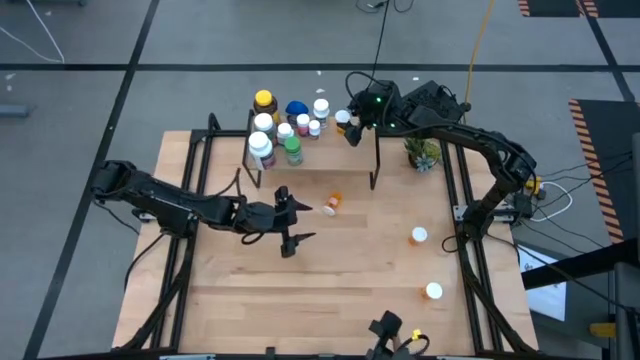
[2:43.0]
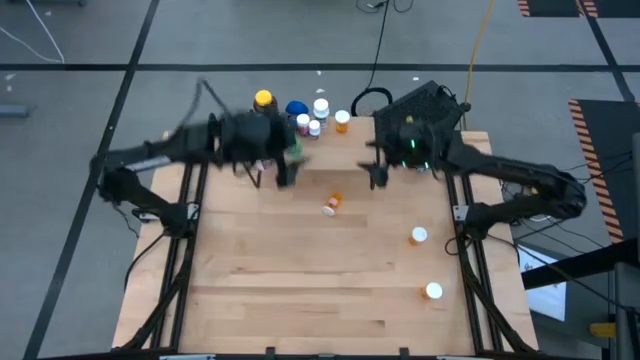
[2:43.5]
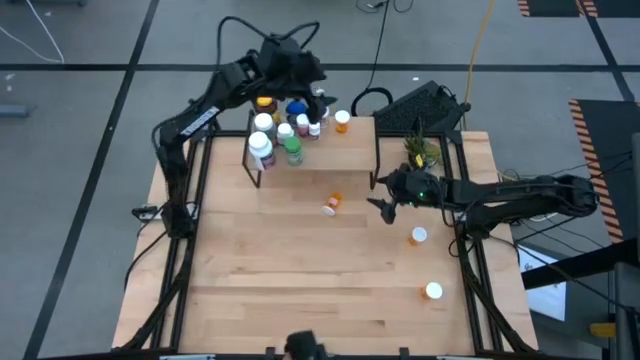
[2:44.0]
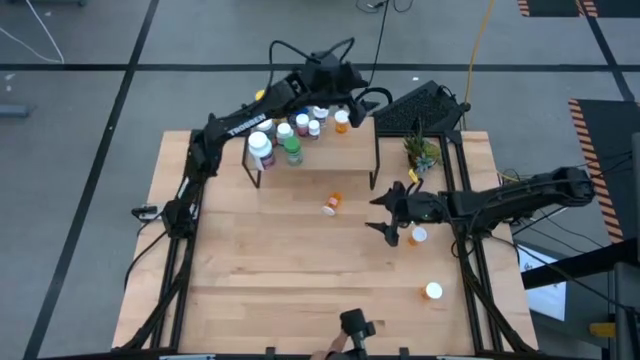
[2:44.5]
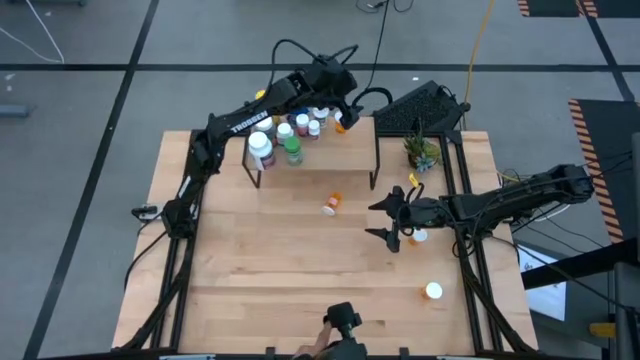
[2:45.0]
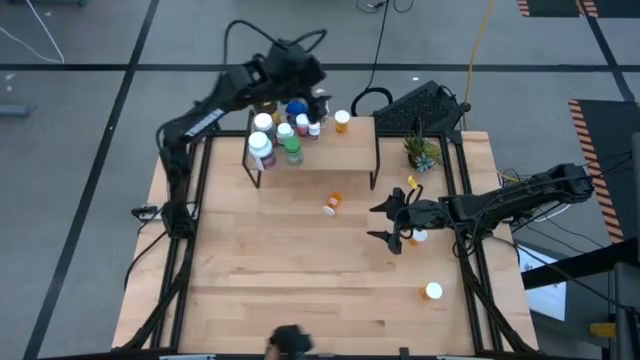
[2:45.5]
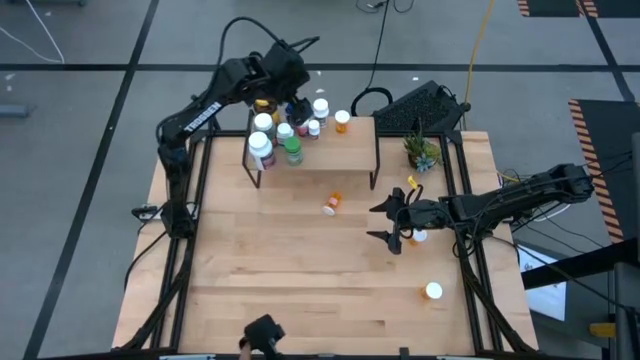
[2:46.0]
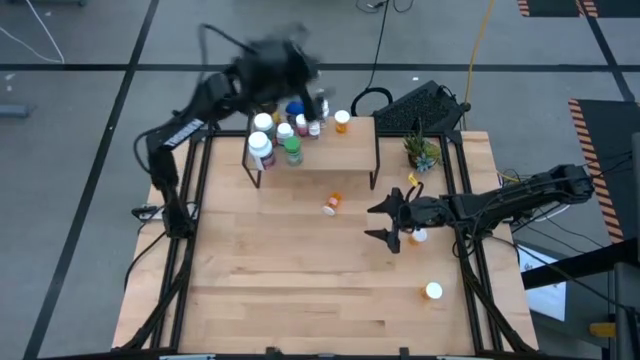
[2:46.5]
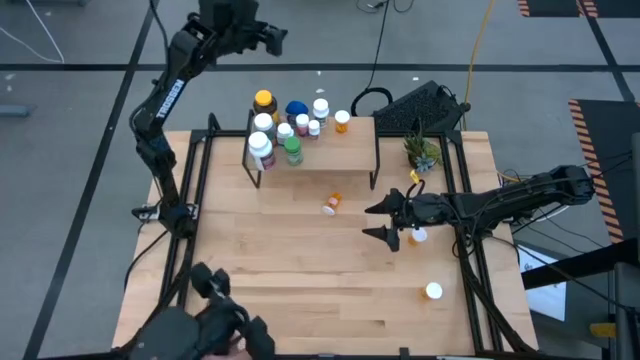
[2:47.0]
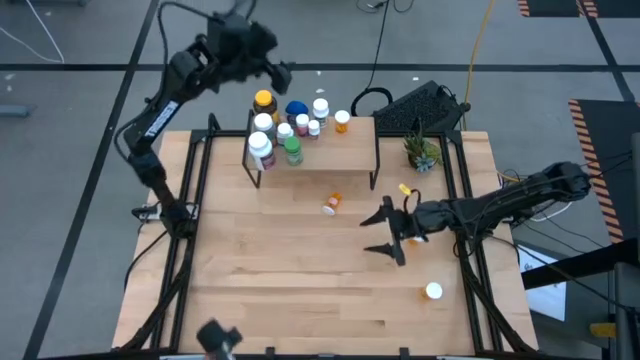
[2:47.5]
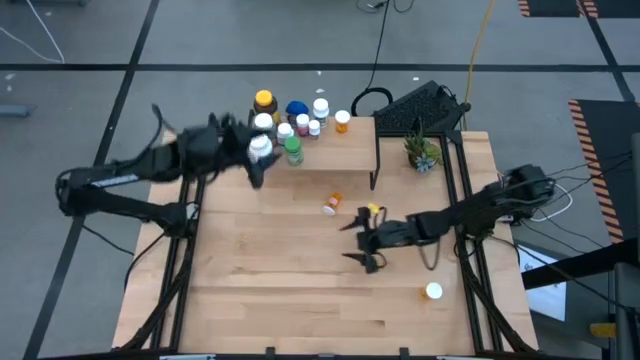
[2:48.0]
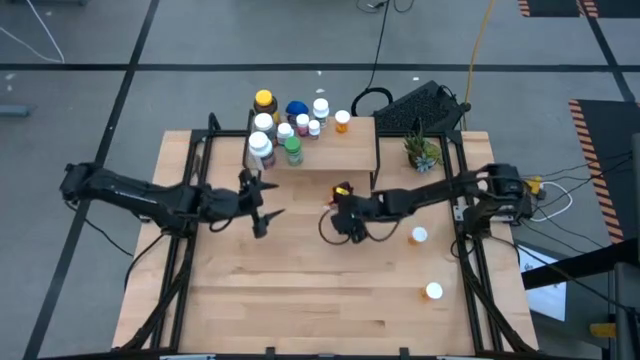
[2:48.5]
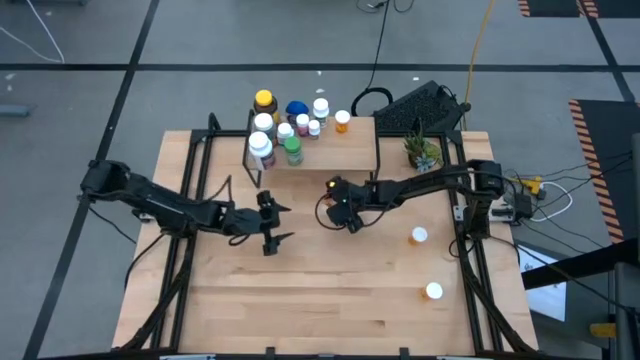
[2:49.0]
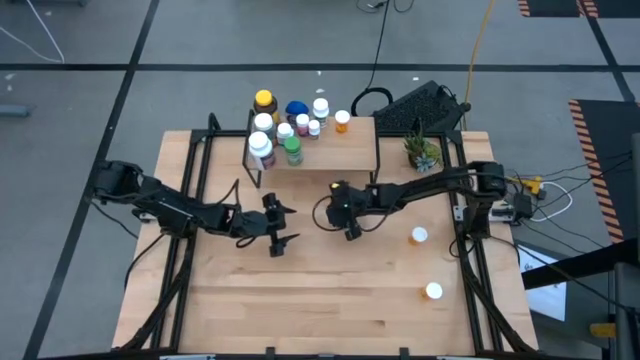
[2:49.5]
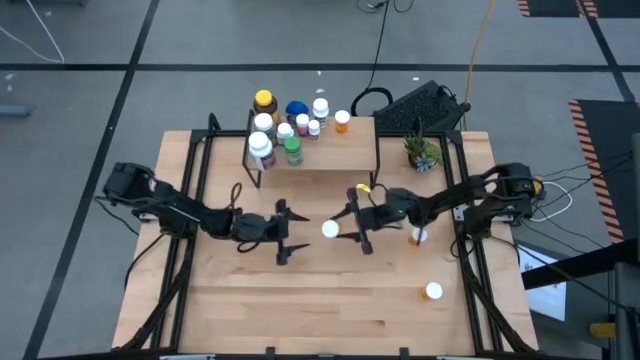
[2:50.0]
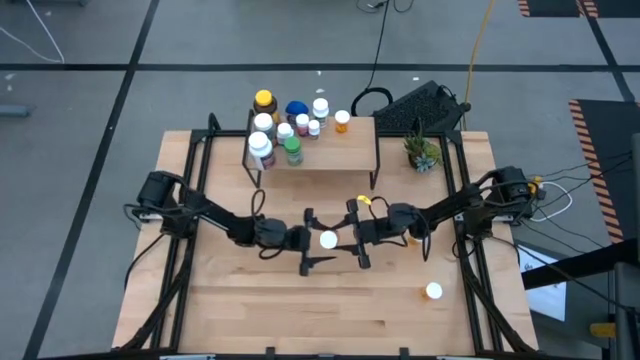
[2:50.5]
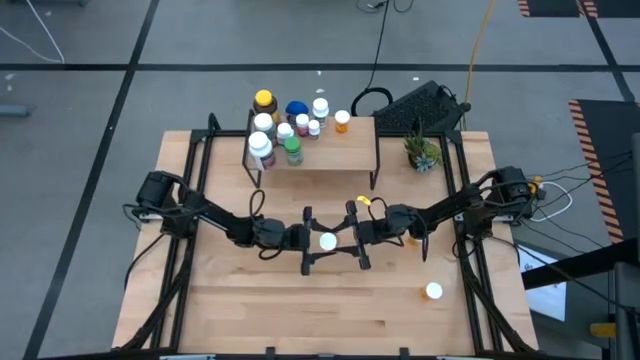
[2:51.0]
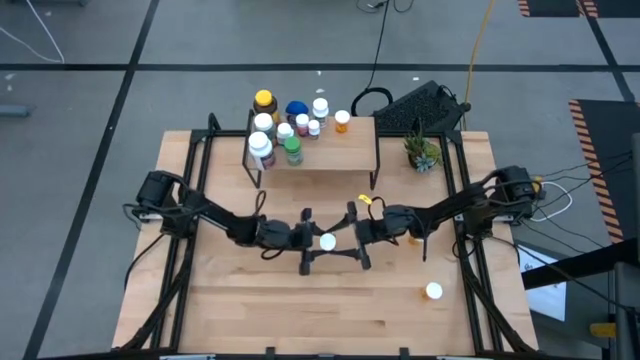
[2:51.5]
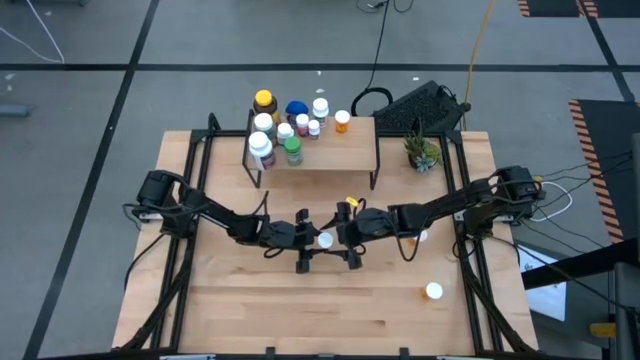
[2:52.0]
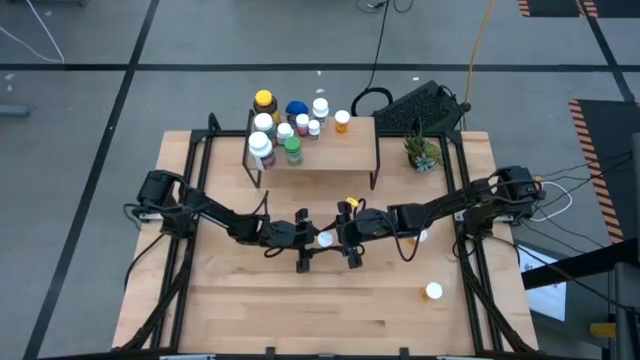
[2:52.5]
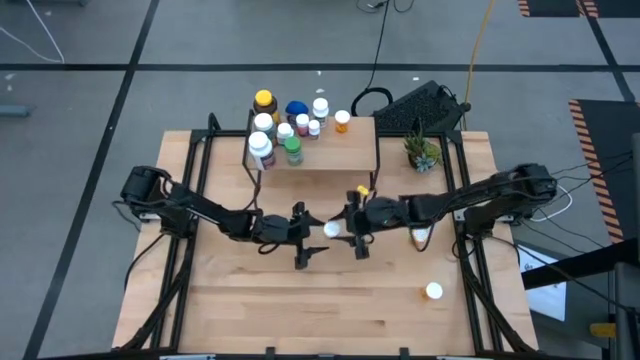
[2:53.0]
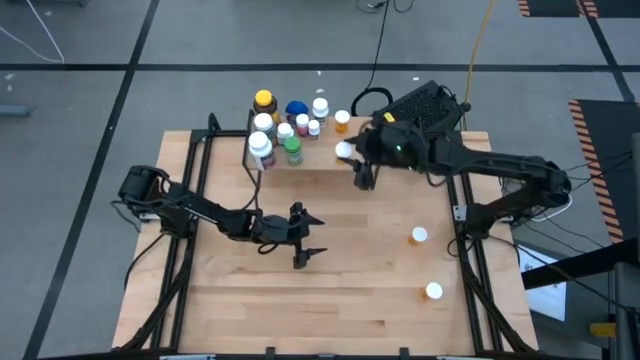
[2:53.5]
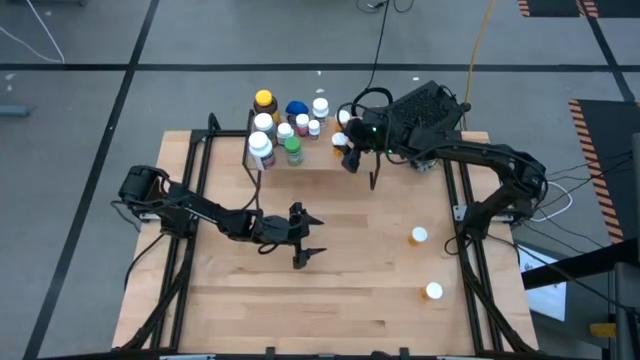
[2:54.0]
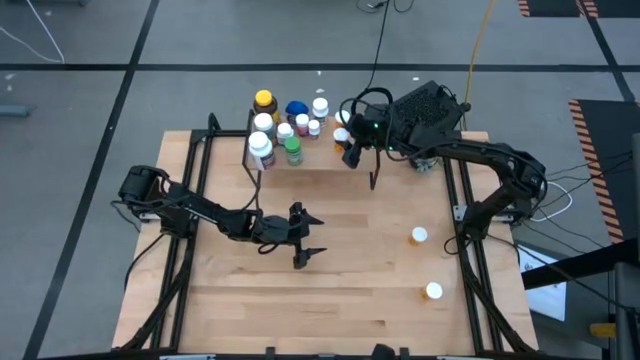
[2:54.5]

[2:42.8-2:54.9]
Task: Pick and place medicine bottles onto shelf by color
Put the top left orange pill bottle on the shelf, aligned with the other orange pill bottle

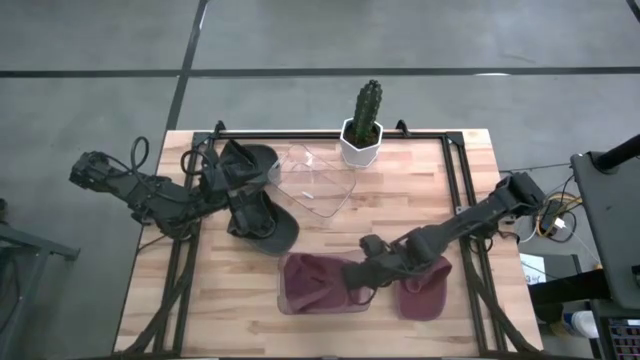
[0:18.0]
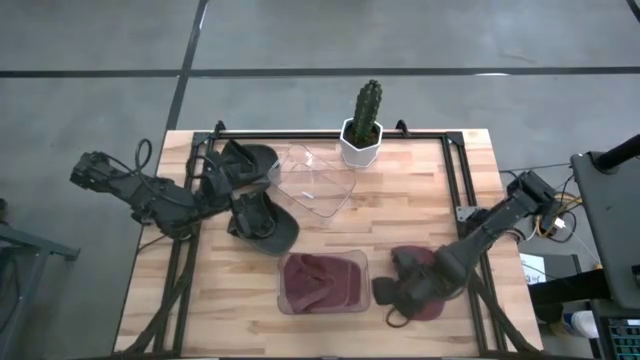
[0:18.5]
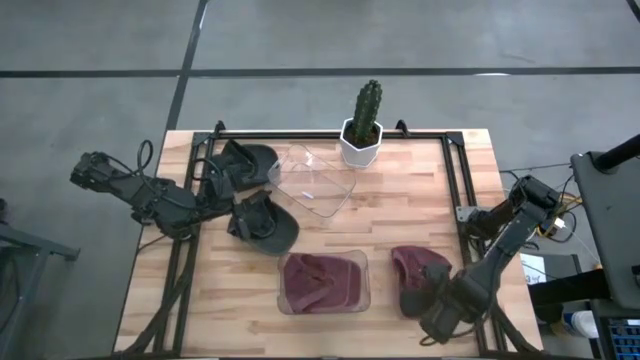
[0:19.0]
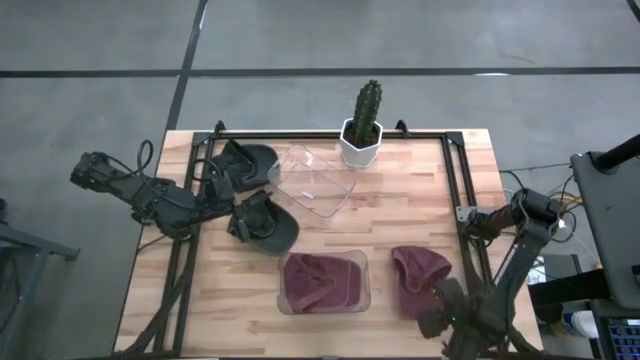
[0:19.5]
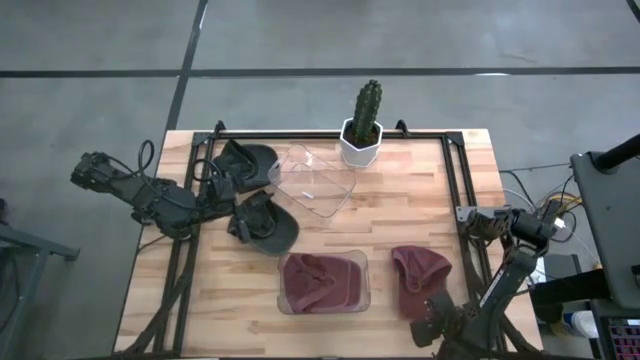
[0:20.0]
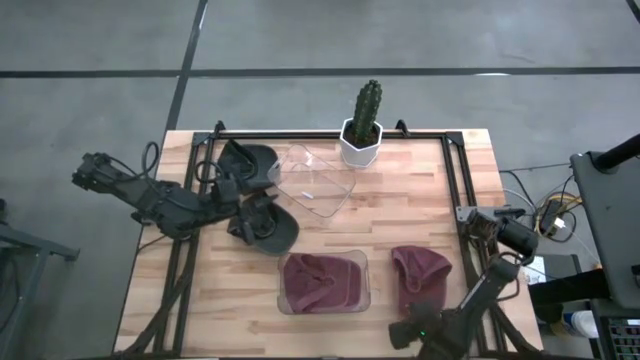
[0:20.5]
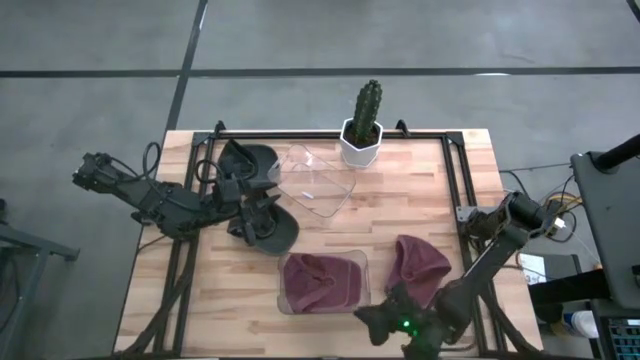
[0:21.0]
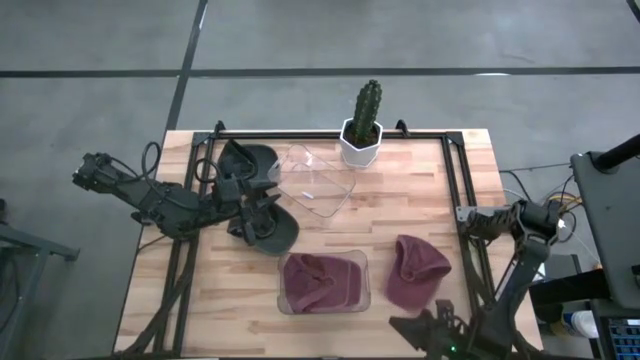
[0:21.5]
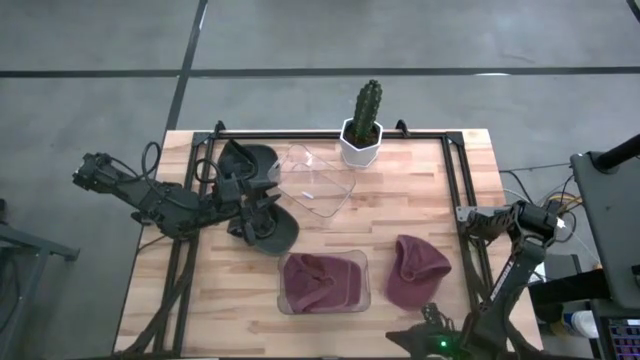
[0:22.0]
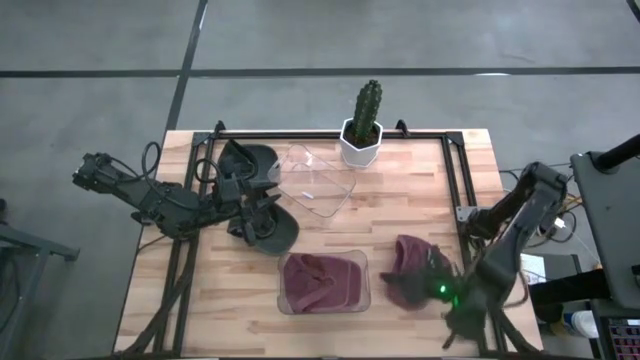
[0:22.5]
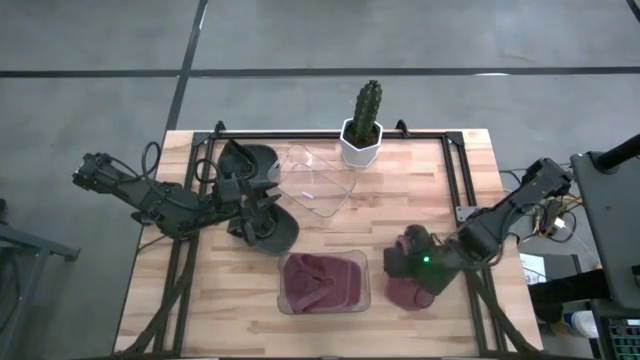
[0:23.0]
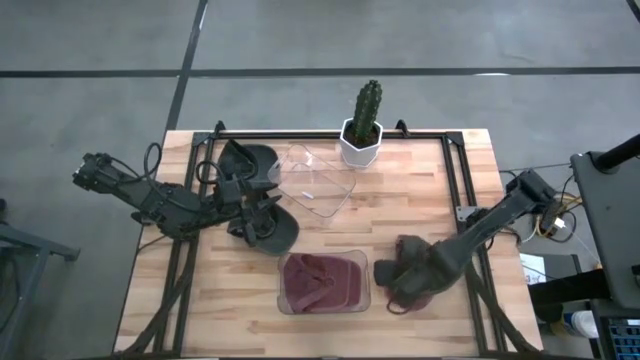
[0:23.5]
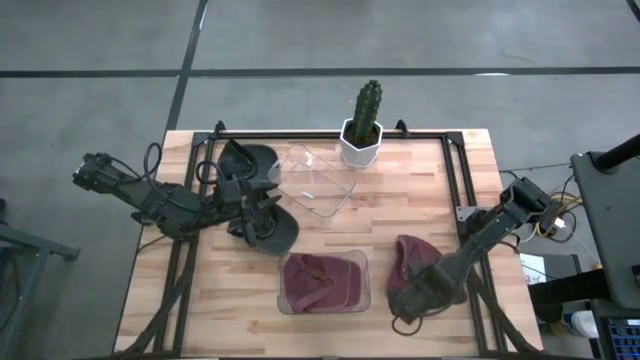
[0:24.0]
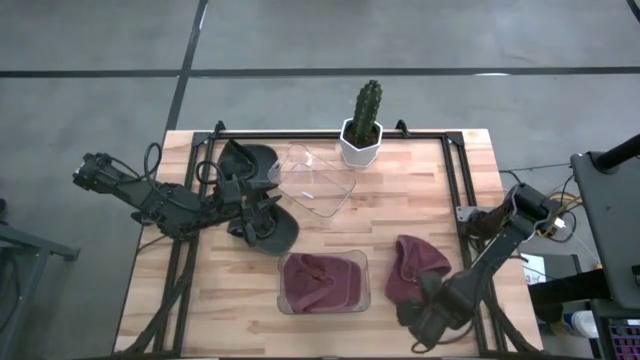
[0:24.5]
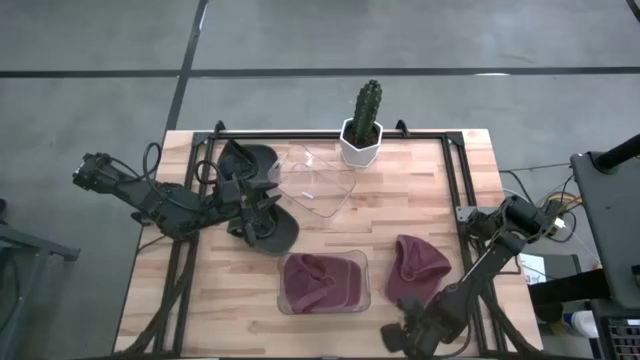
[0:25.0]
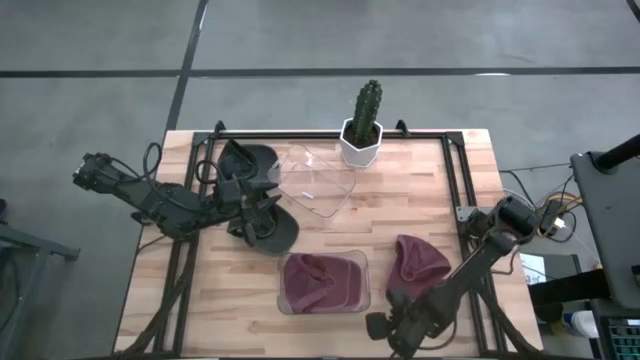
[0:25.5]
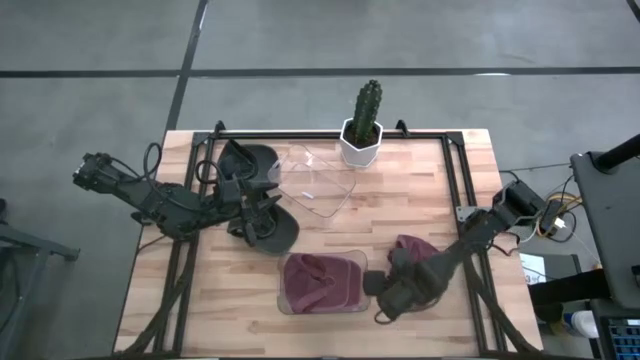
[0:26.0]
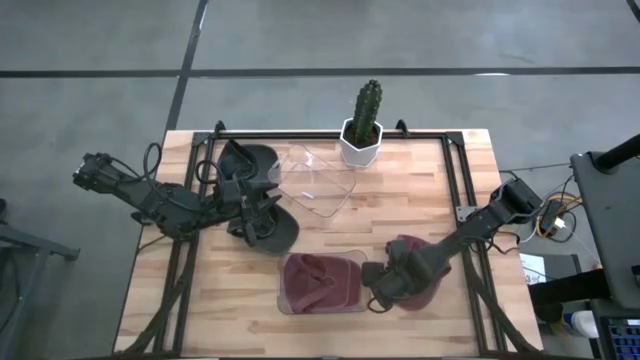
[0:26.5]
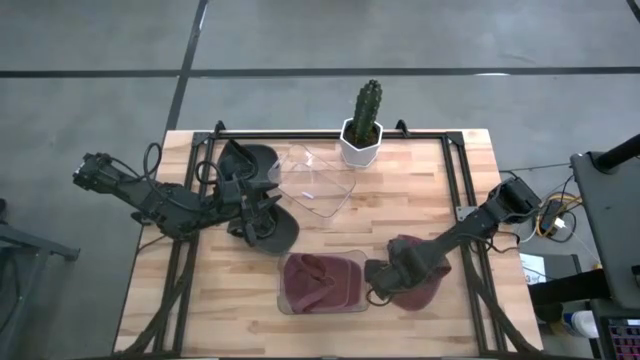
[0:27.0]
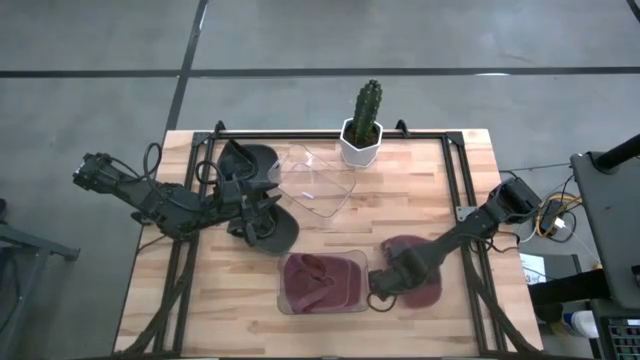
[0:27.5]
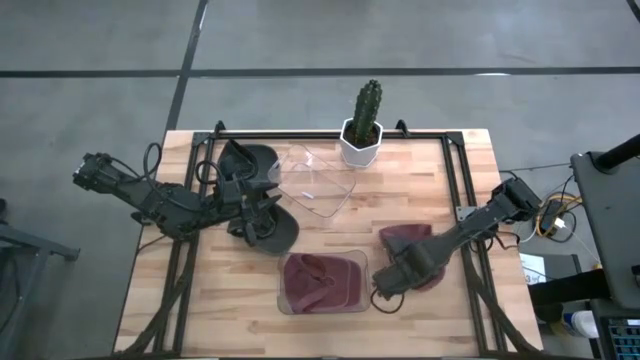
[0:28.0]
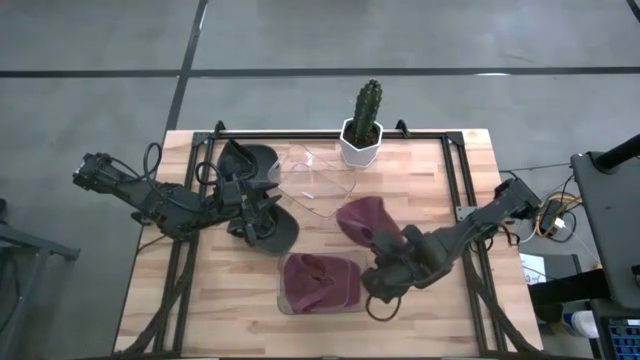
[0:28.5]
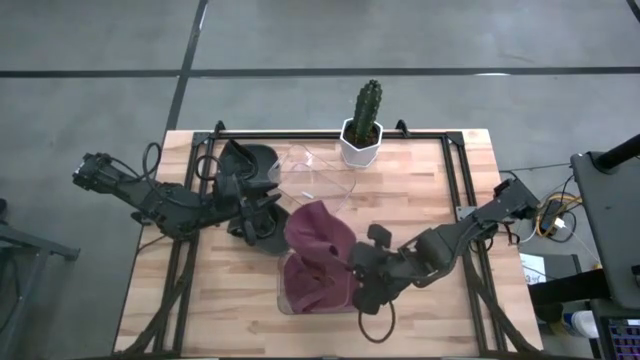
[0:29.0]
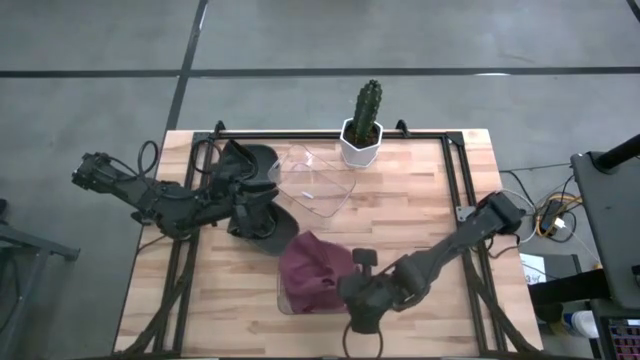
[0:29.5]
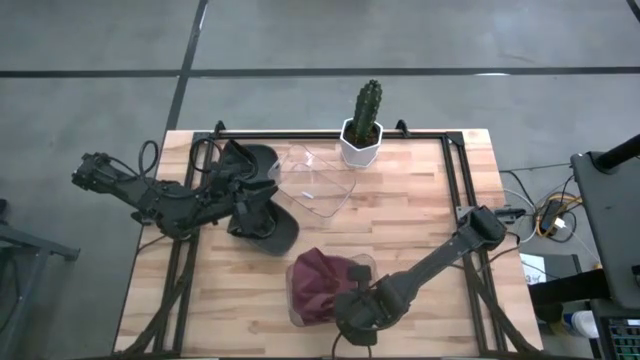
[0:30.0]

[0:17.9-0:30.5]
Task: Pick & Place hat
Put the red cap into the bottom transparent bin
